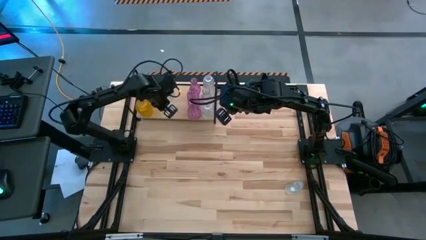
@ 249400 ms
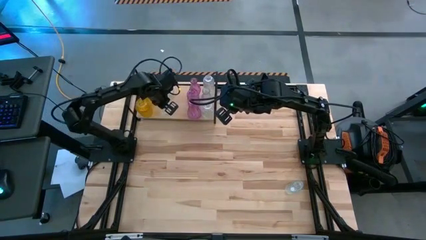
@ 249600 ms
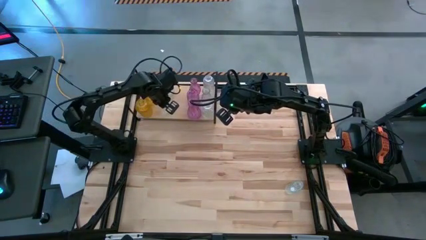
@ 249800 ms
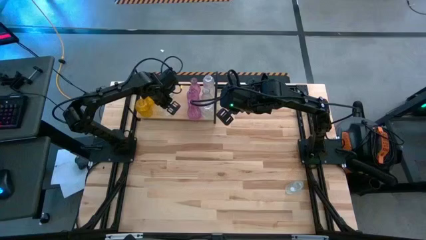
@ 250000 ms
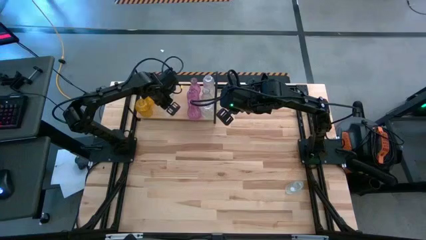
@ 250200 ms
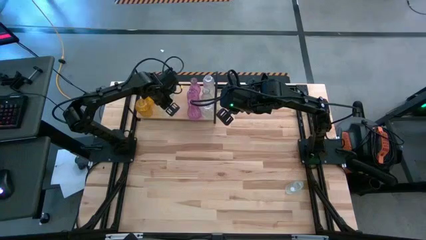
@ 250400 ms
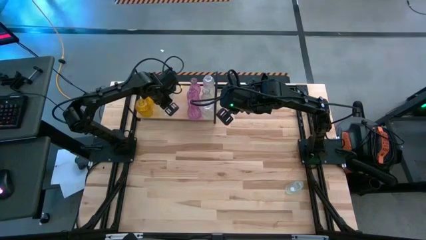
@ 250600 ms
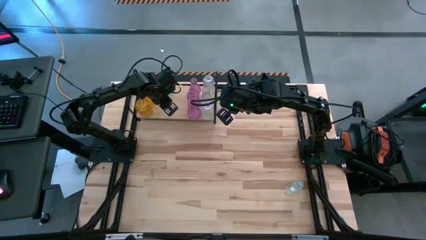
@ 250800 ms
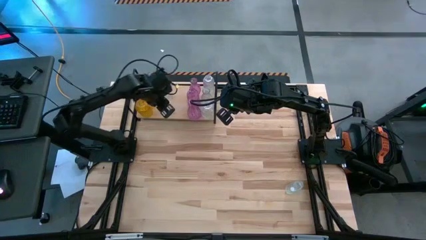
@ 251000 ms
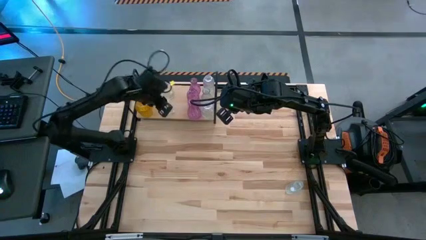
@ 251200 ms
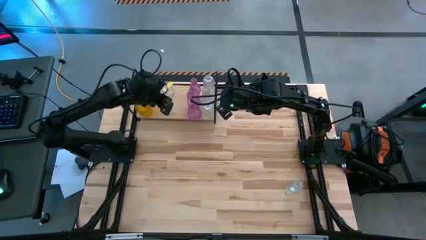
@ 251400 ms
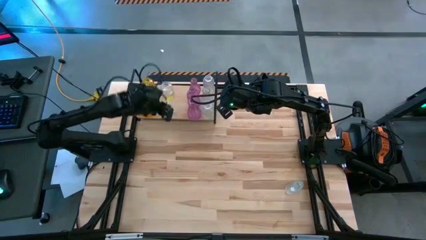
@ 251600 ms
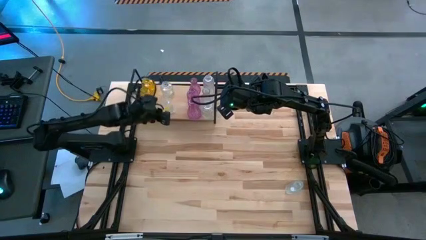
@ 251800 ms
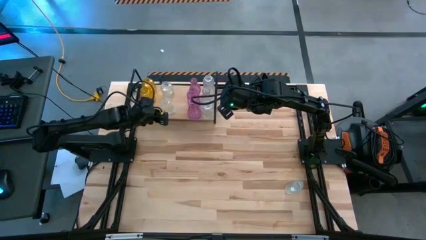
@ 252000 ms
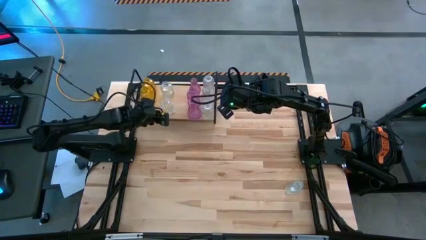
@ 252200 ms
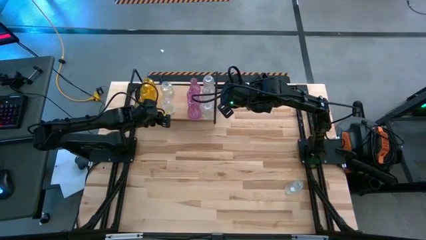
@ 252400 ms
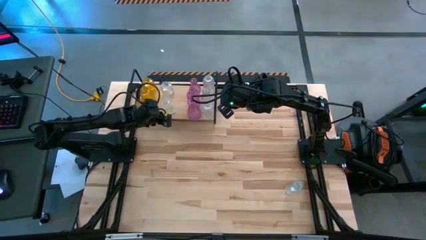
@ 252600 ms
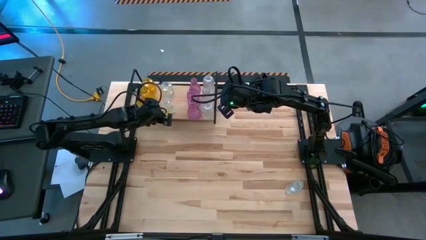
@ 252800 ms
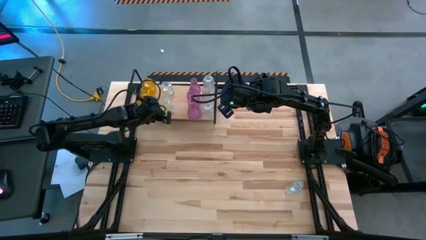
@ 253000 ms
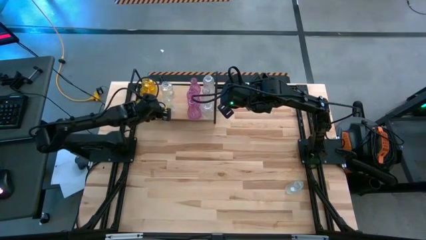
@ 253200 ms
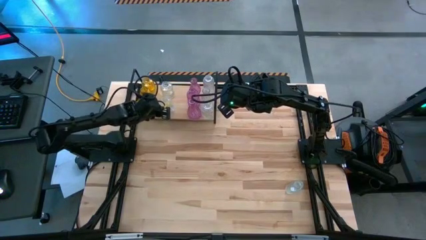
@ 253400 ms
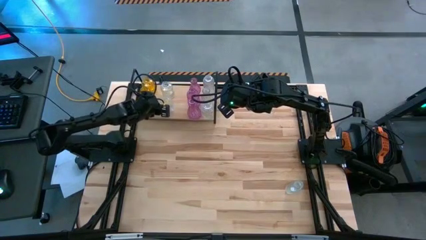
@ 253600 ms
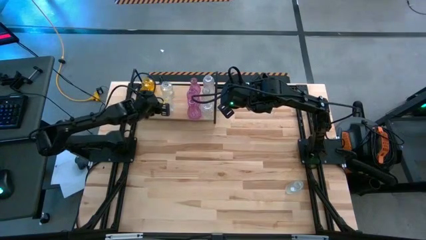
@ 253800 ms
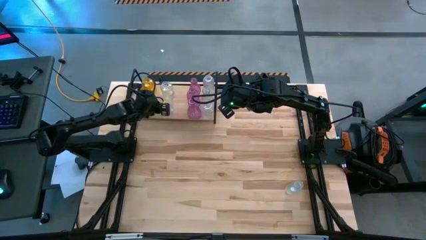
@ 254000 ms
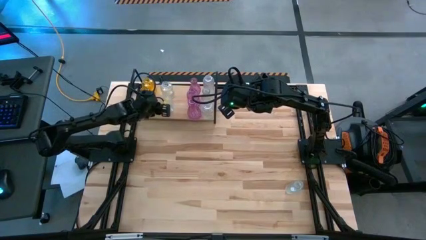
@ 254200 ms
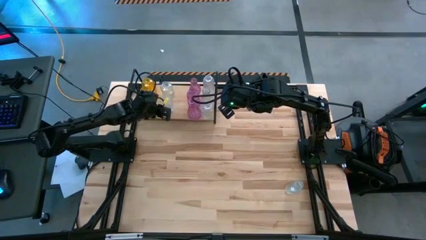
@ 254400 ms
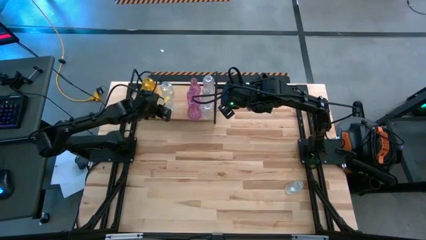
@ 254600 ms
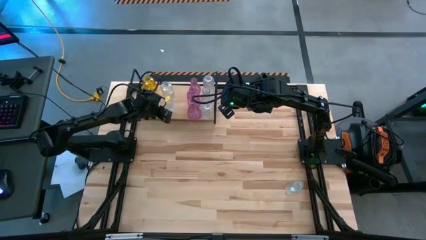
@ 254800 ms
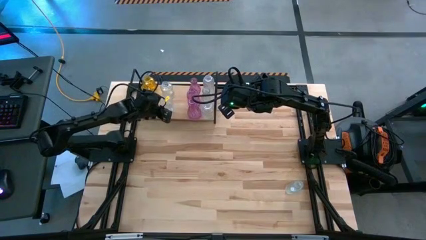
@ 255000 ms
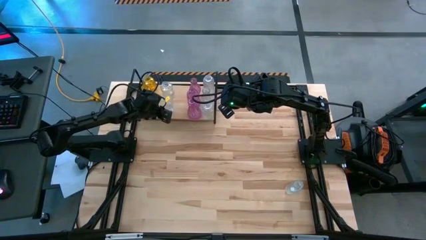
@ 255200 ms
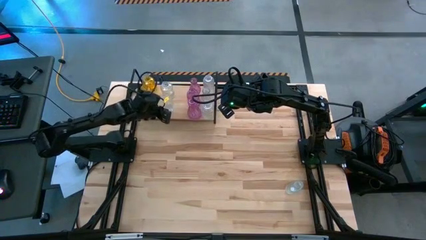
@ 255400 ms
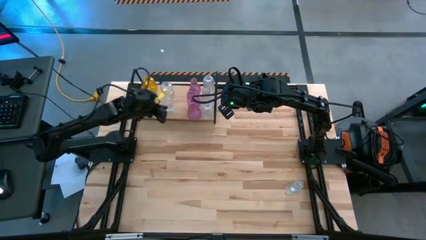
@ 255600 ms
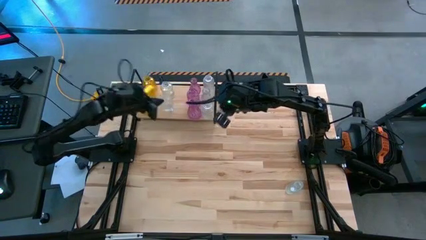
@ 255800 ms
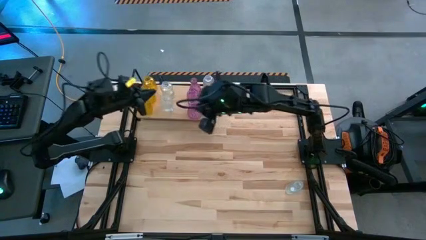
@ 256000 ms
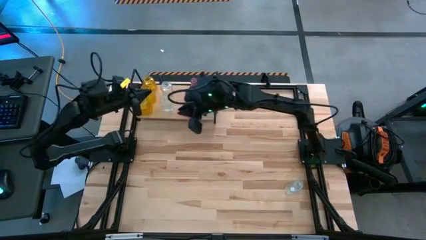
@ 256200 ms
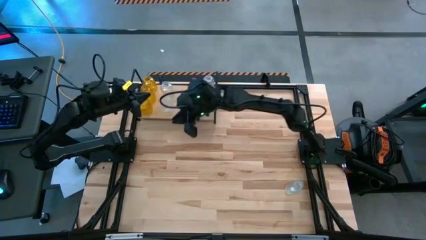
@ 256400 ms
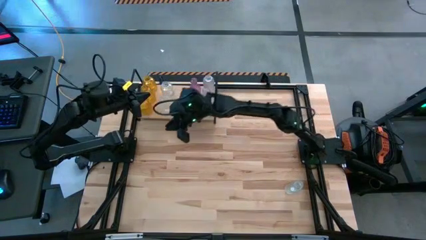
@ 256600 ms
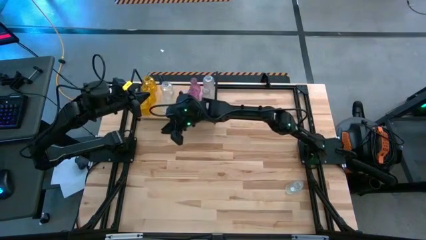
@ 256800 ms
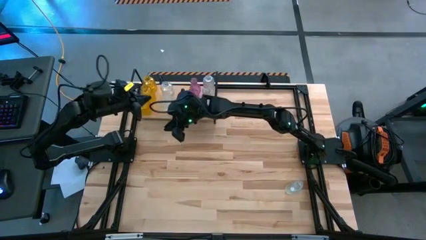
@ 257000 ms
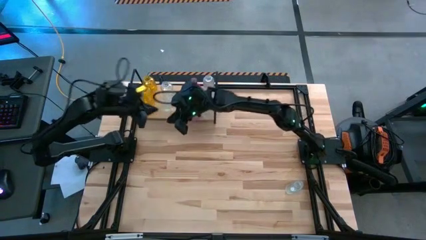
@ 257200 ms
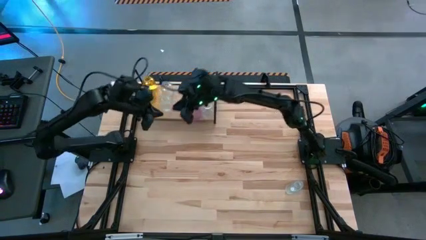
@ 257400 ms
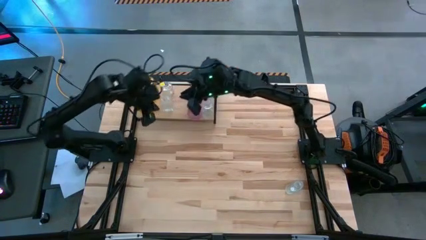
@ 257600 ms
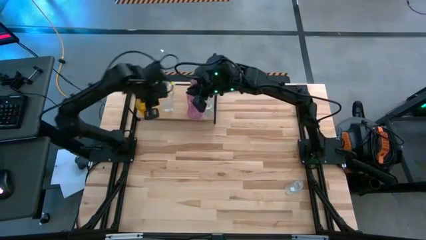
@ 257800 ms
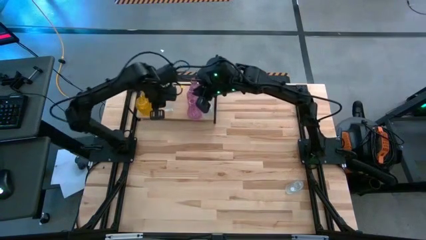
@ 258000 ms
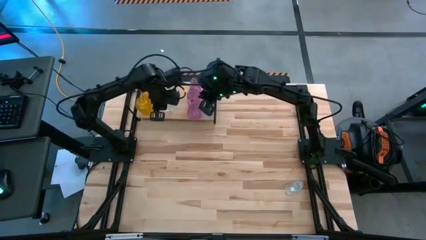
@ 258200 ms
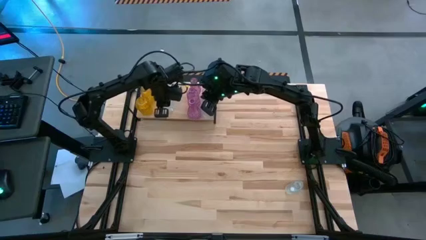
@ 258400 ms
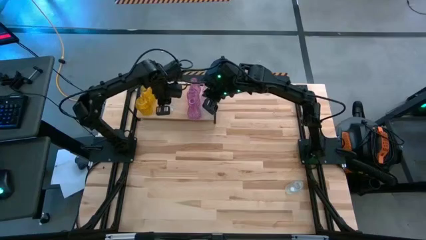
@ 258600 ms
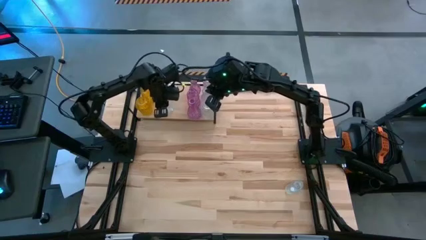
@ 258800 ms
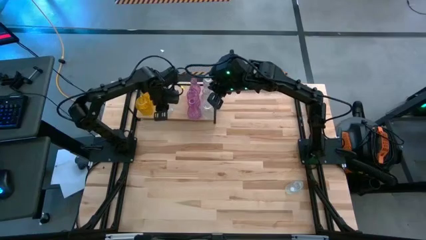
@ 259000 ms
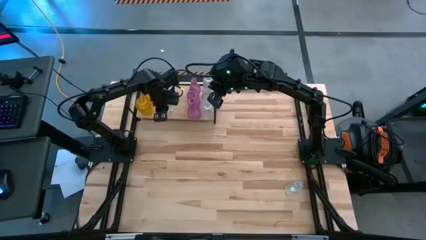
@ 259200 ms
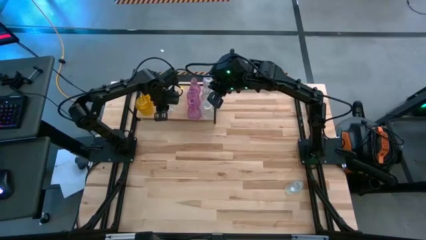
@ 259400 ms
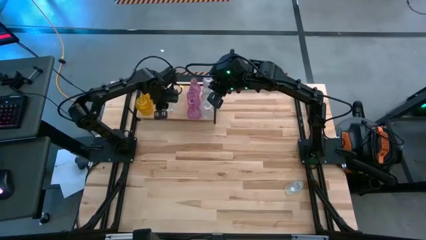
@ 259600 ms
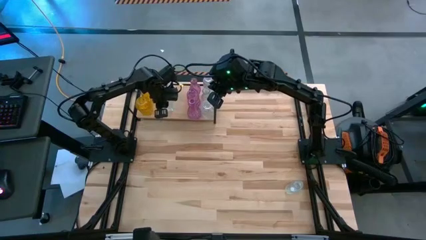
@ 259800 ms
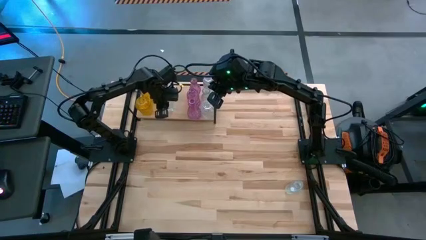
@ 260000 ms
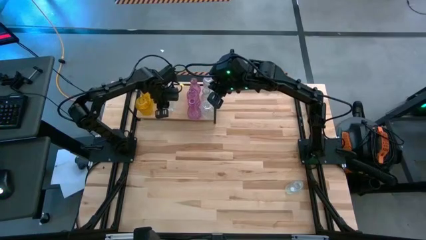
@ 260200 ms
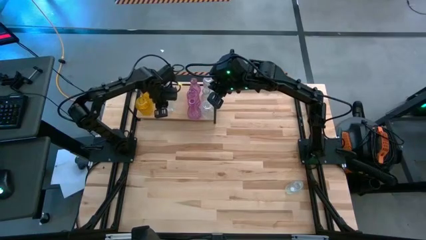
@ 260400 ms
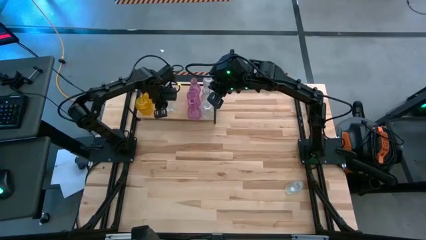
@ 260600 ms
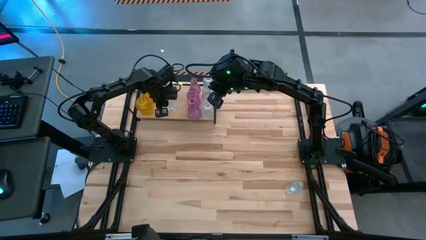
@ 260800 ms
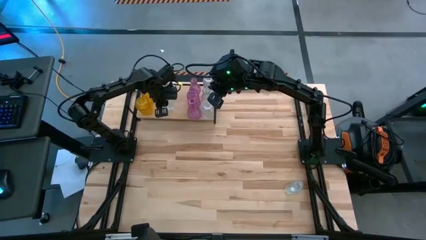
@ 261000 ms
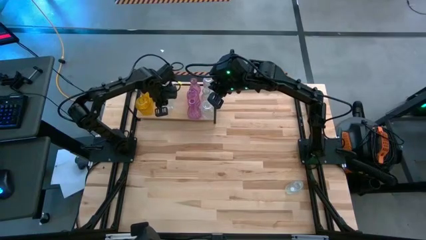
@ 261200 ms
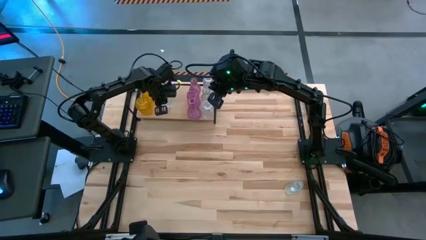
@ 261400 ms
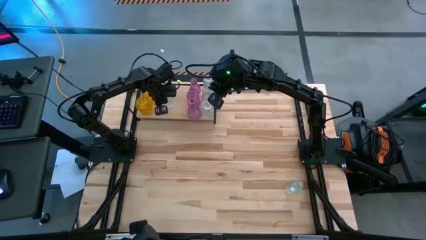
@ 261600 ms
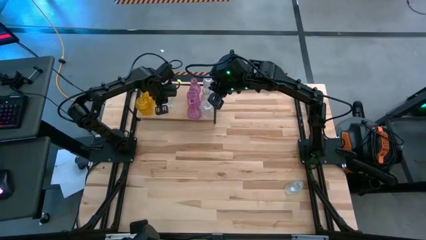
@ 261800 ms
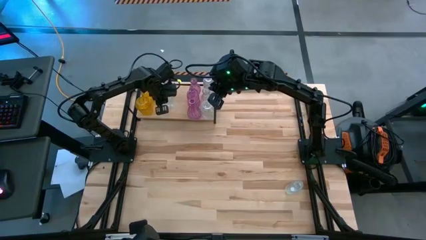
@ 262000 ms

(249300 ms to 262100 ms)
Task: sort vases onto shelf
Put the transparent vase on the shelf aligned with the left transparent vase

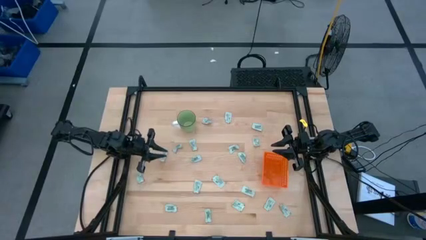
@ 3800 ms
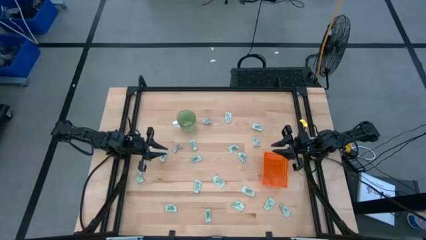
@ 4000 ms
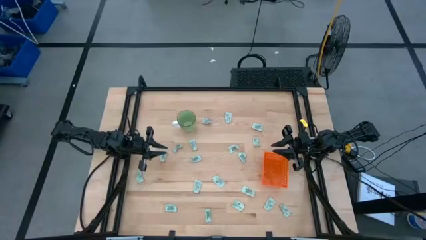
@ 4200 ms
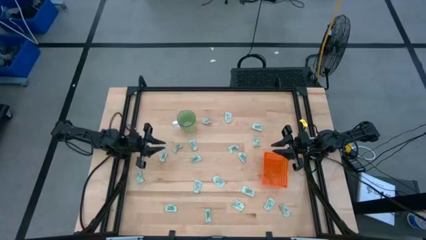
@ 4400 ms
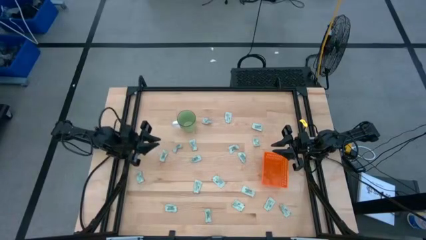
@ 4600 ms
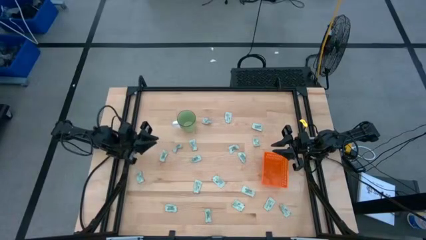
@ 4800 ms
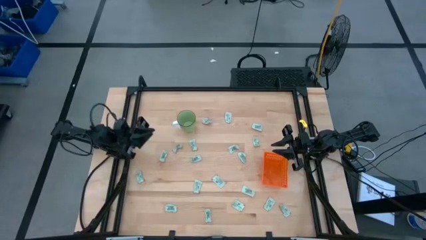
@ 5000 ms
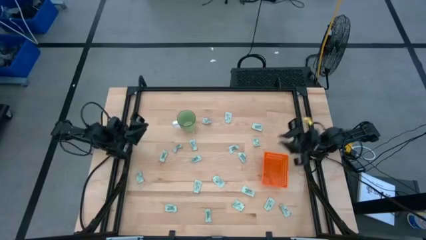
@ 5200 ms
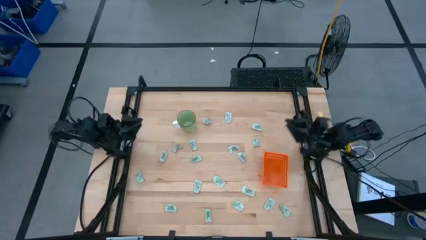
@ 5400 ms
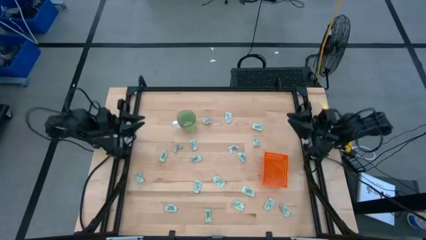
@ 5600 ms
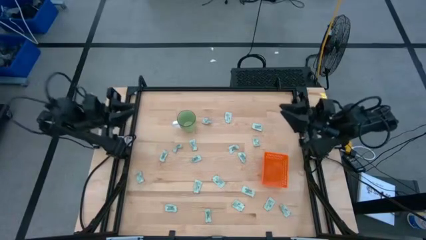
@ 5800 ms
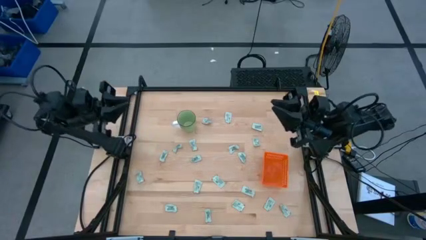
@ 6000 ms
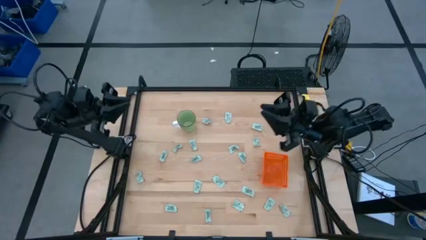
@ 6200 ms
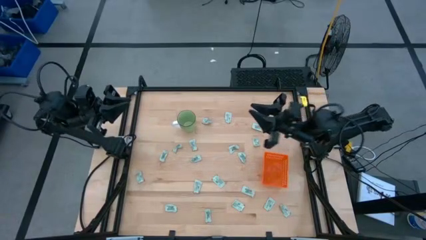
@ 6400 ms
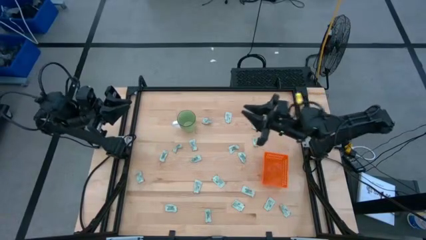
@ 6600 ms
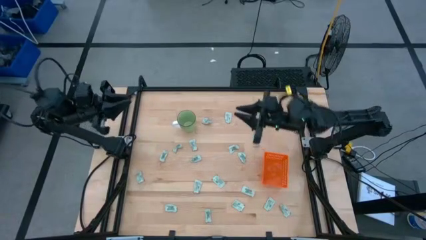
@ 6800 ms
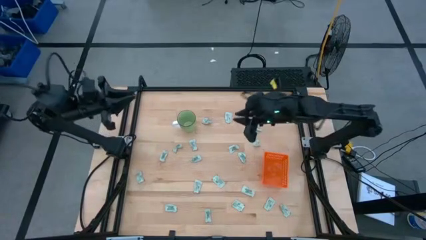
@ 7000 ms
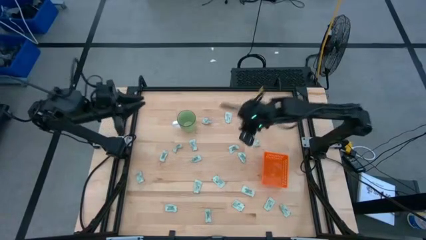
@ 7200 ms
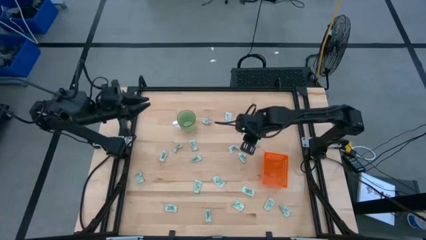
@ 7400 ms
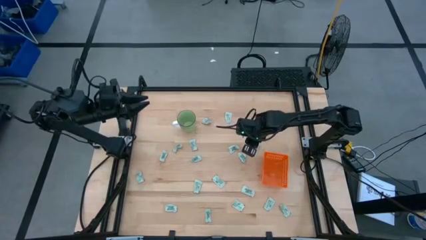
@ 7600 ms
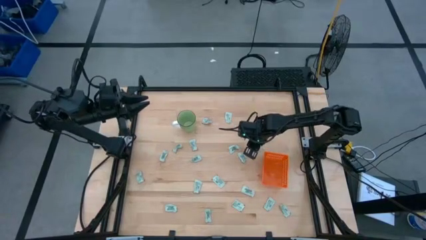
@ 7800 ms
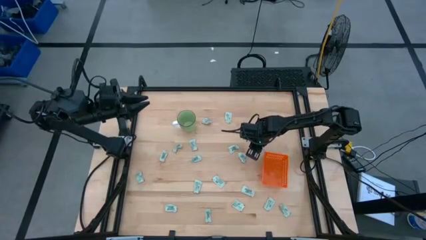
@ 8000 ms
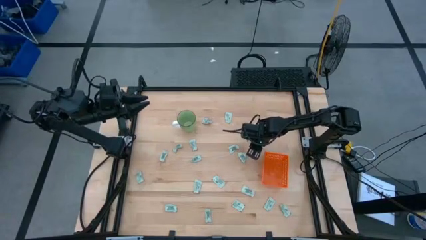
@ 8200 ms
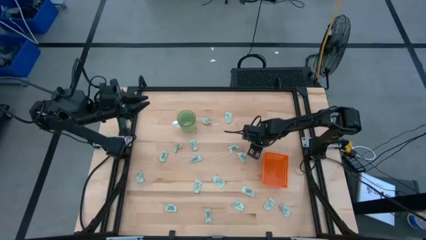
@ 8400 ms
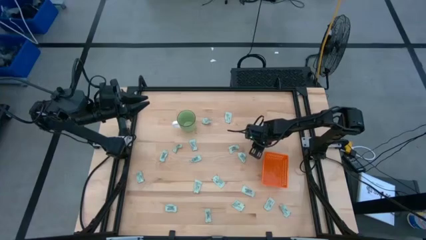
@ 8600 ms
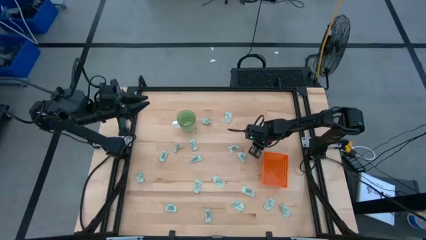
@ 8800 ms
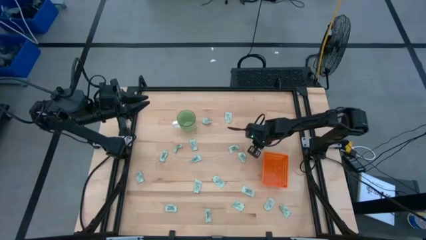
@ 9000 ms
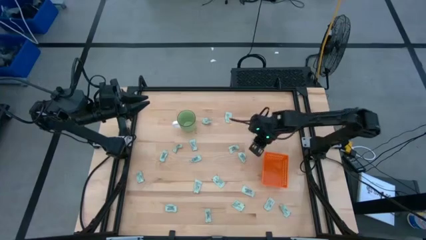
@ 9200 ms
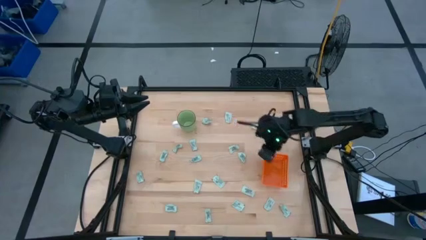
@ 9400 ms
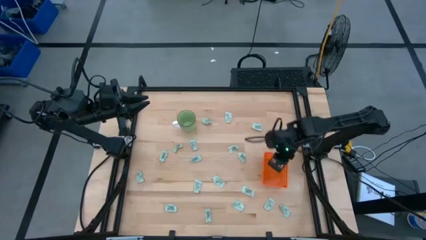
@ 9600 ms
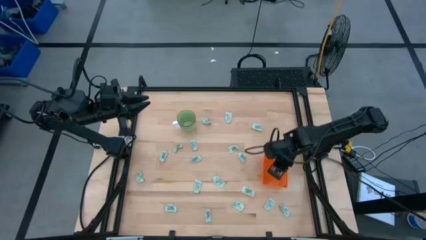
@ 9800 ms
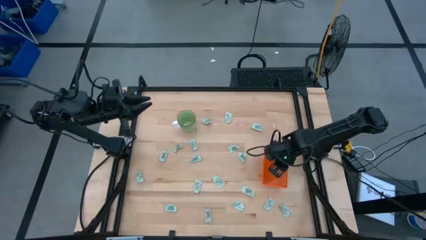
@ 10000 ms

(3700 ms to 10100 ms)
Task: Pick and place Stevia / Truvia into bins
Put the stevia packet into the orange basket
